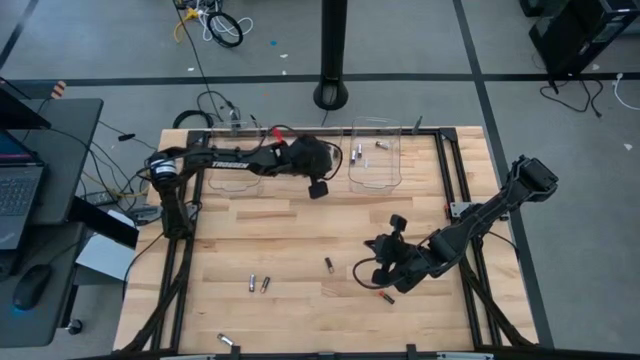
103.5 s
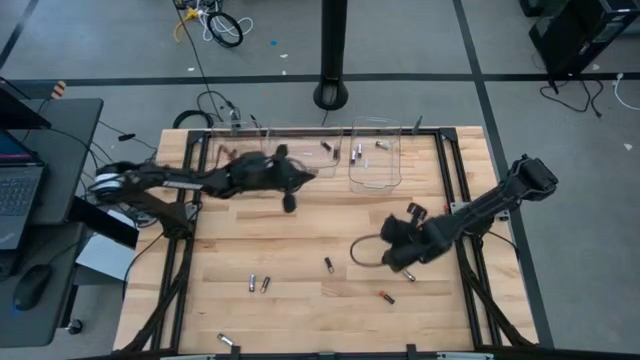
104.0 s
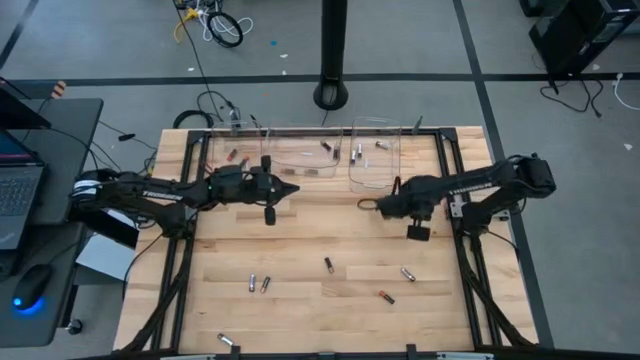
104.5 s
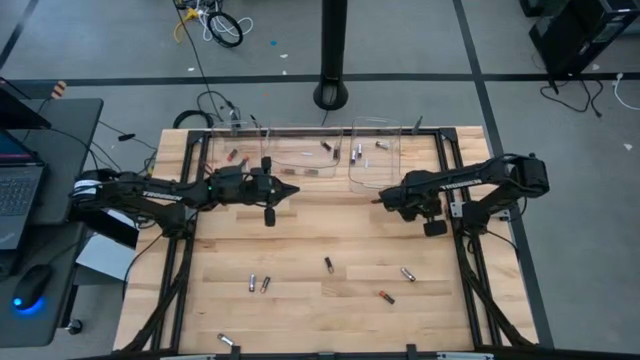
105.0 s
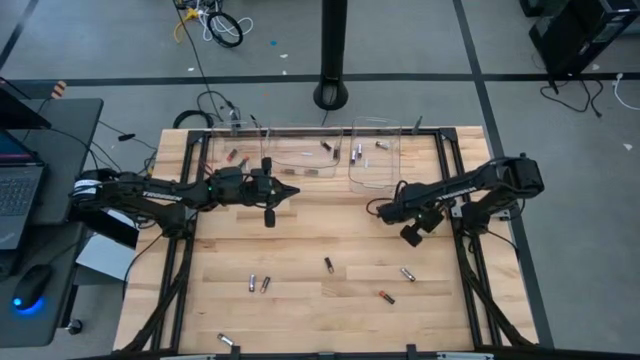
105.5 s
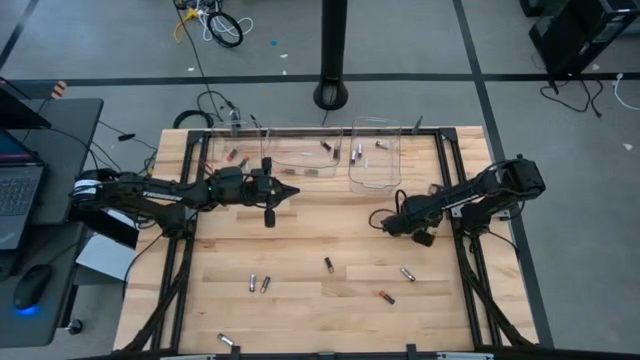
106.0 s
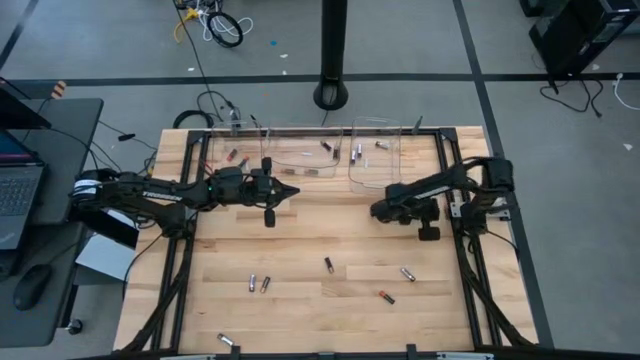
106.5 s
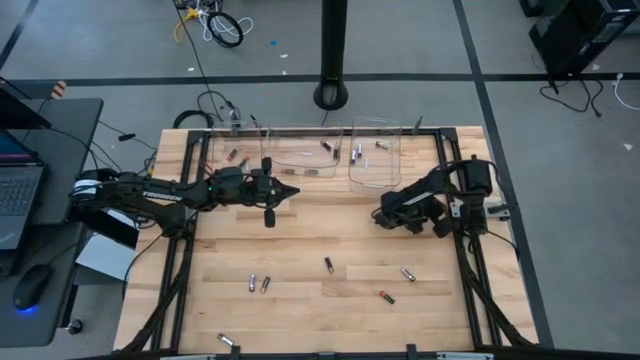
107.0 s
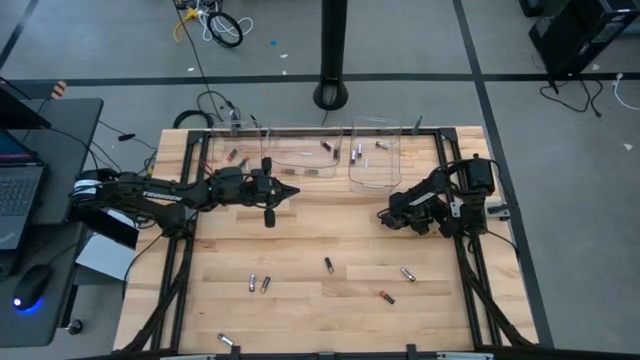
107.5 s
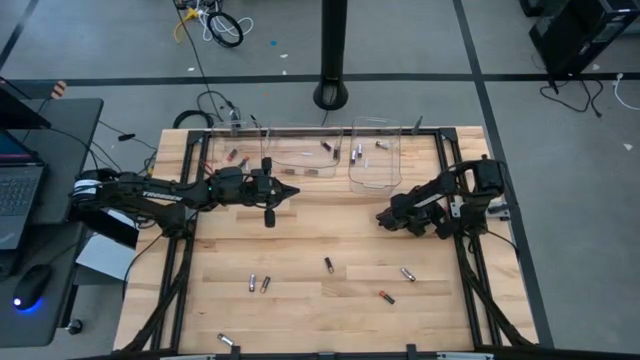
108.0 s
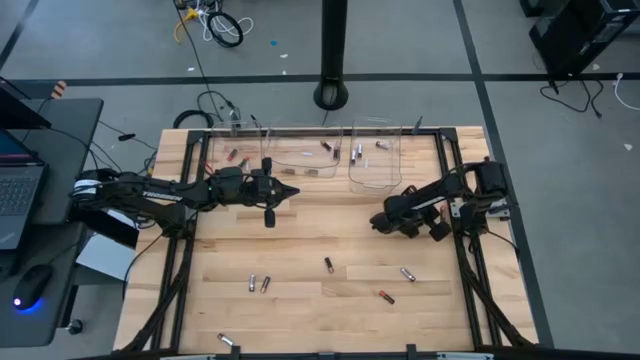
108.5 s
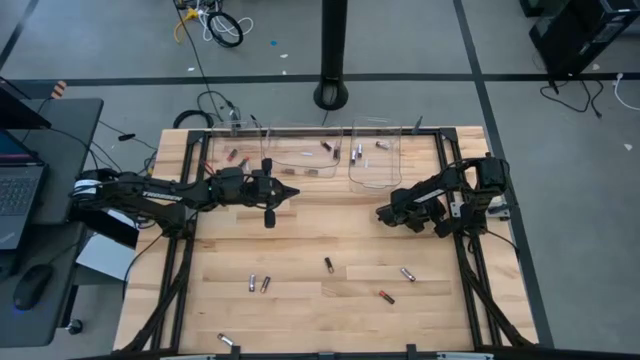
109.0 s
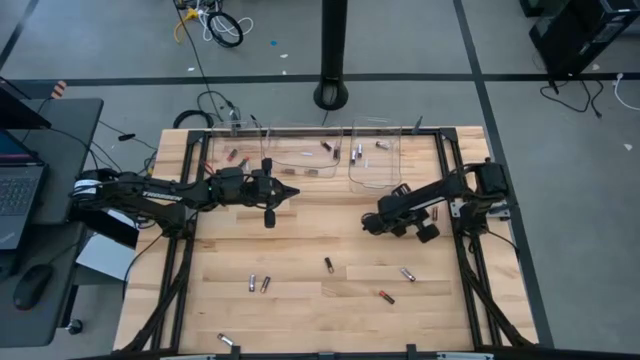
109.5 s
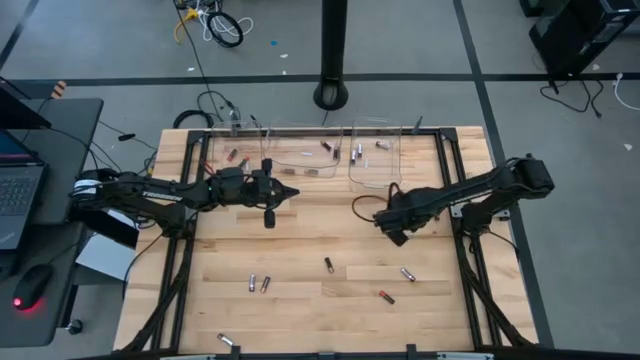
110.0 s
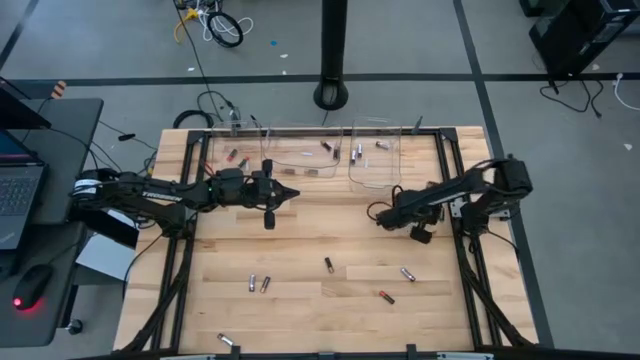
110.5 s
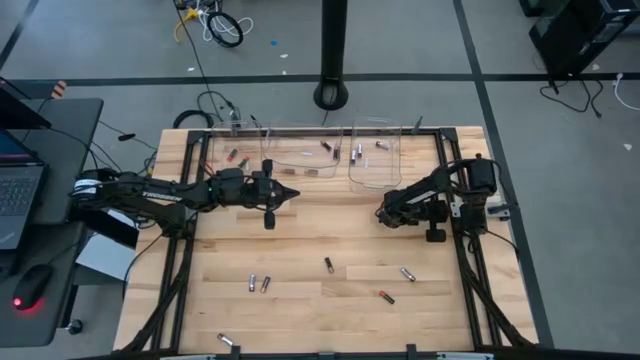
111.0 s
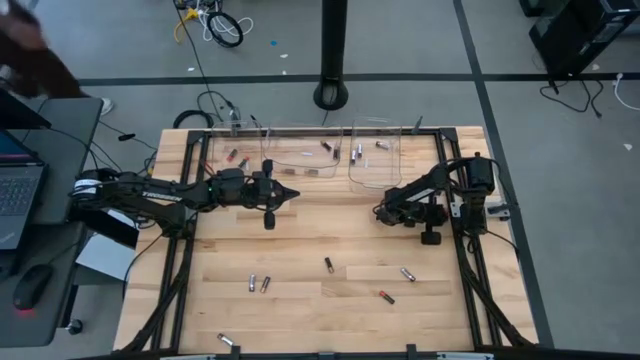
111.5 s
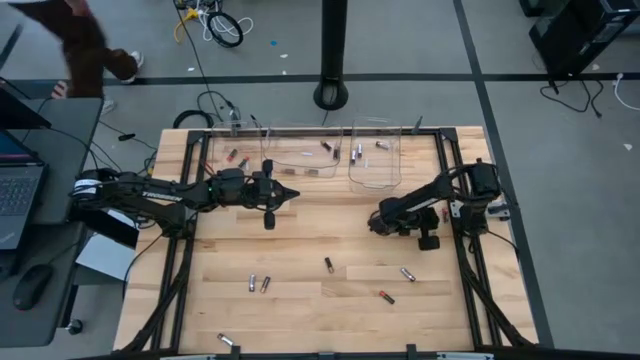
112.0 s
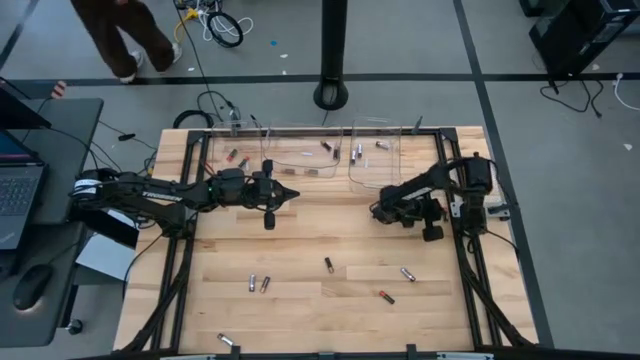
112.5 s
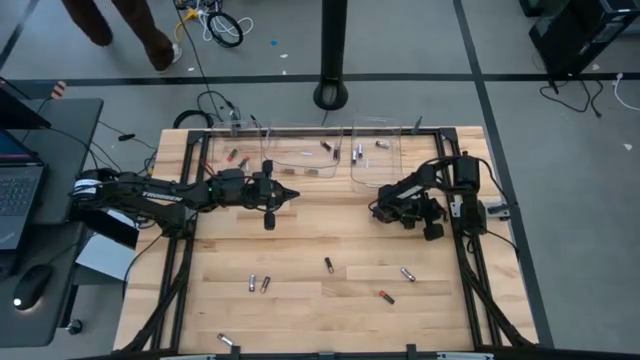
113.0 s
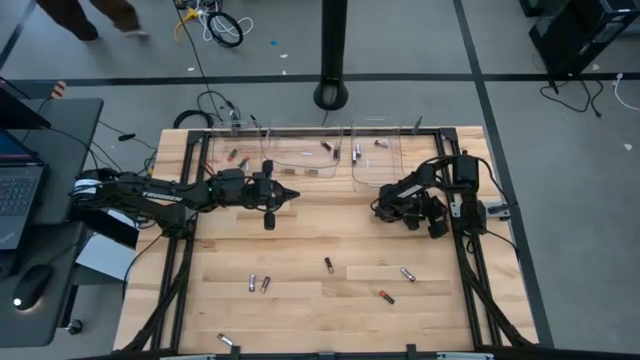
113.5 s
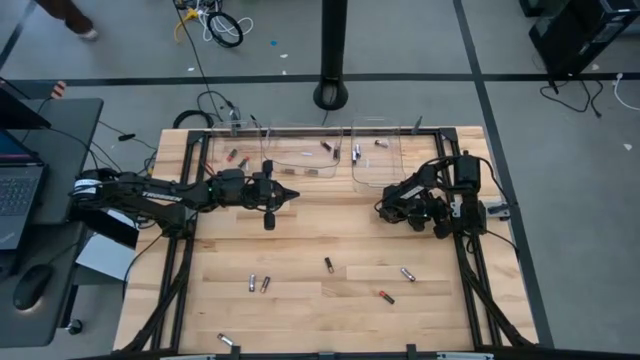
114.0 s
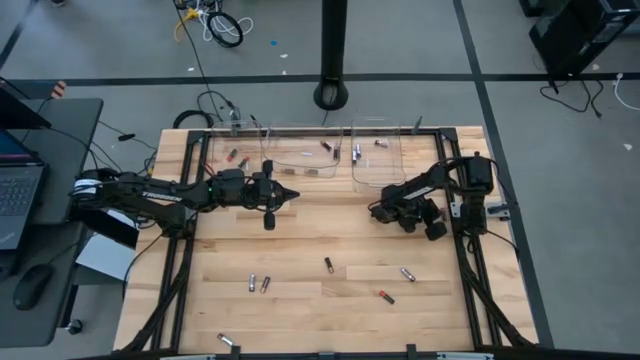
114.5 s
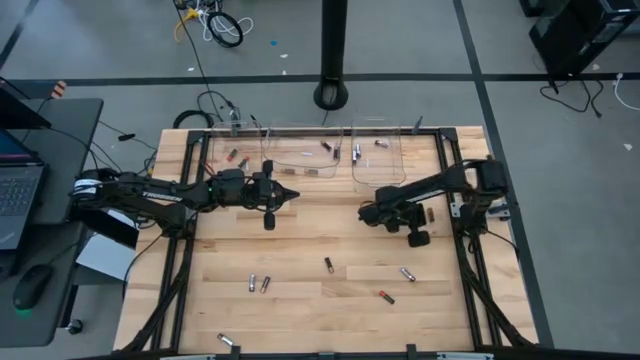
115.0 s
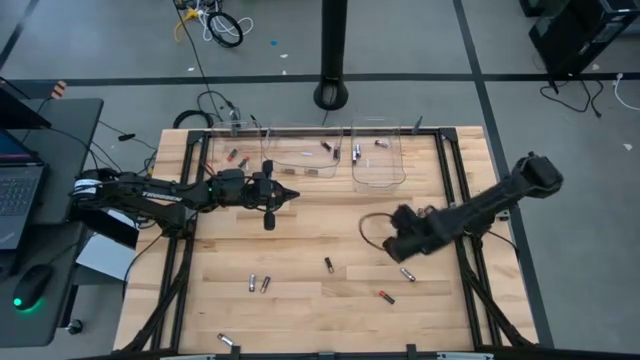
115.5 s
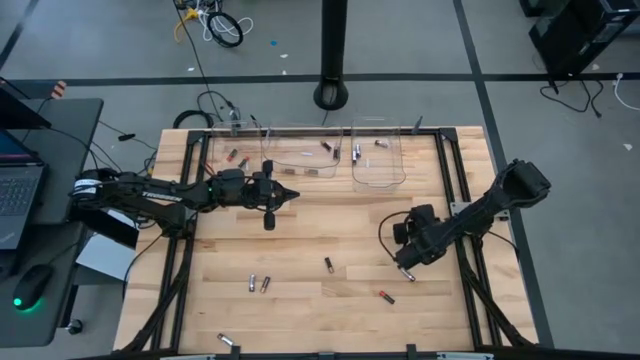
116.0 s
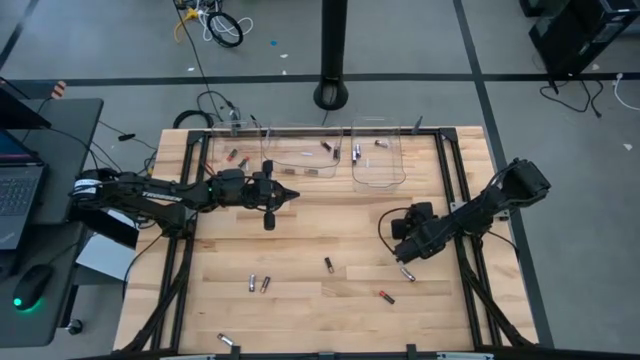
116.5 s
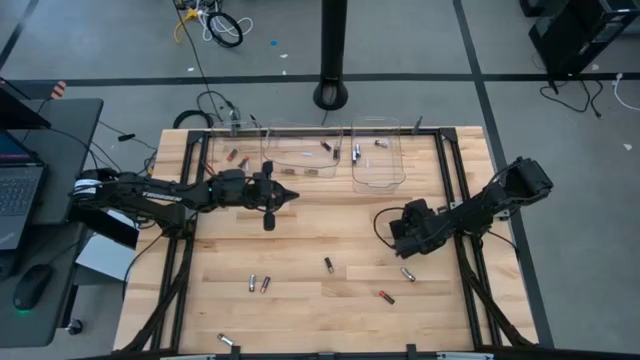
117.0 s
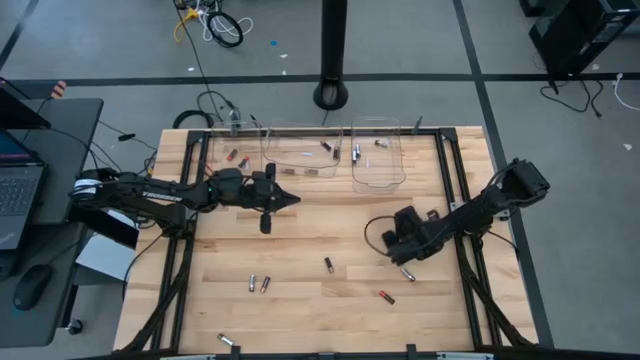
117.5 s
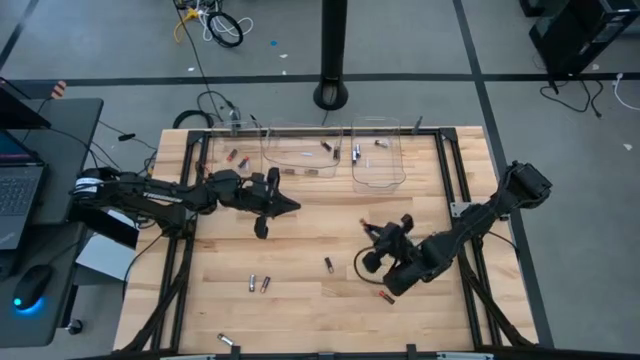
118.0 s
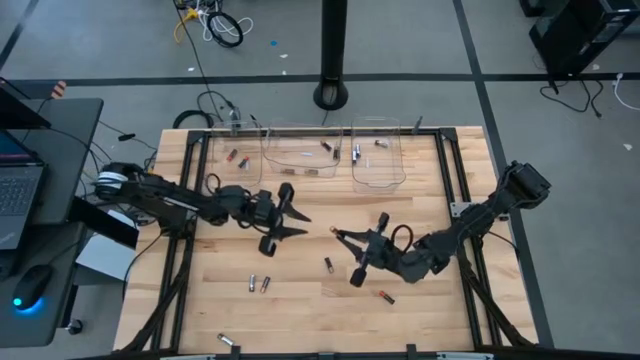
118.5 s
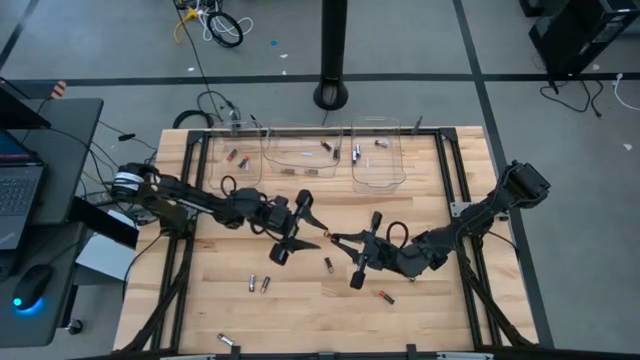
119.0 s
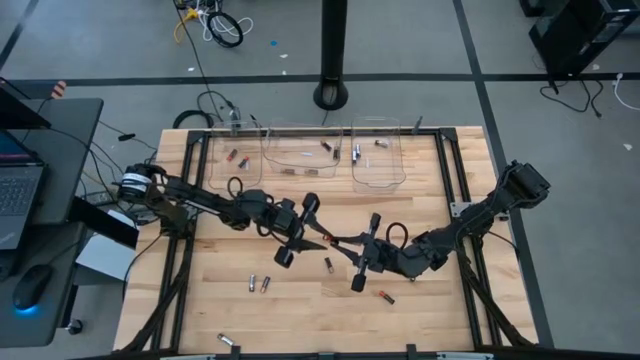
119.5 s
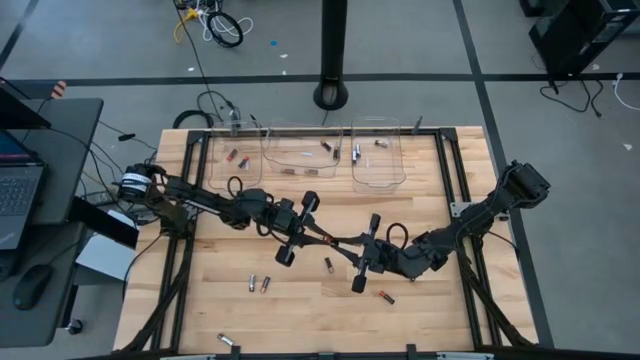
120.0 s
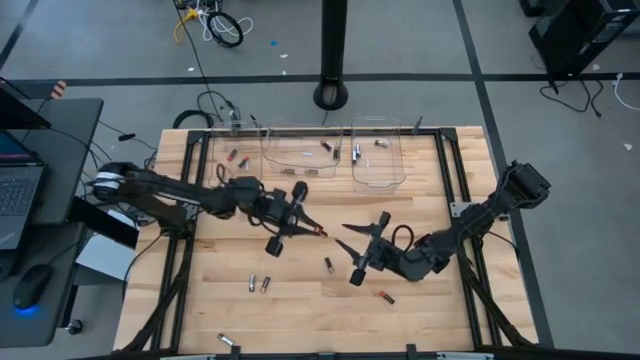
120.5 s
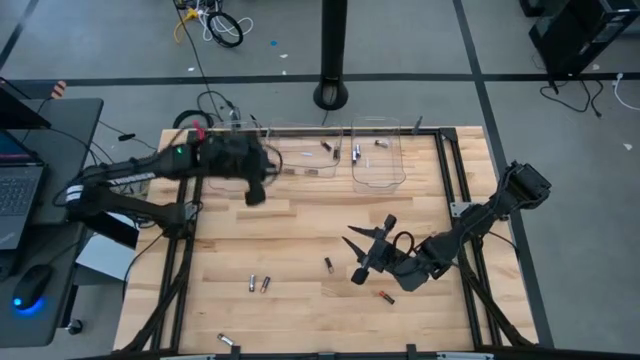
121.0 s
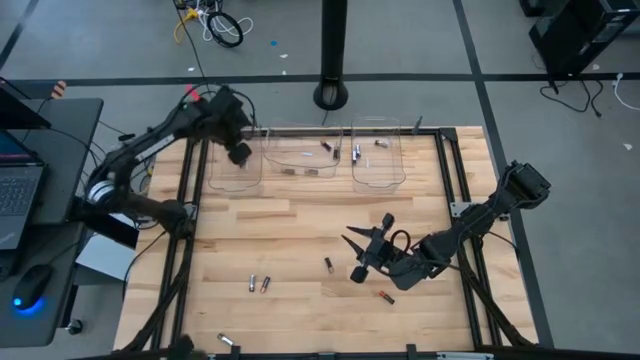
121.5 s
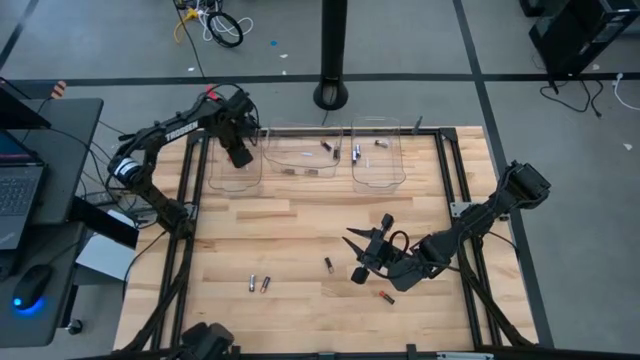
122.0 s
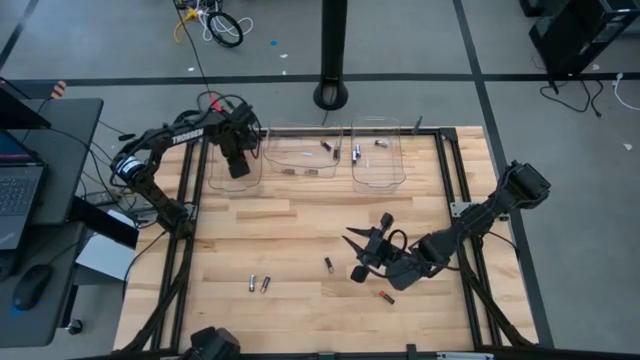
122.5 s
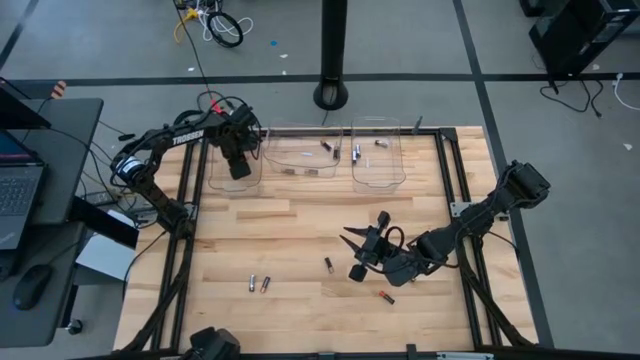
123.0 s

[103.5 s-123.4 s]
Task: Sort batteries
Put the orange battery into the left transparent bin

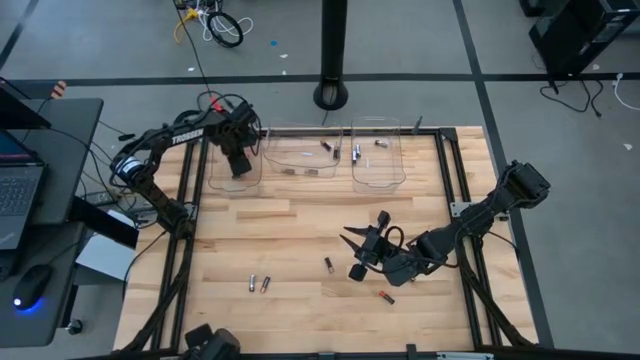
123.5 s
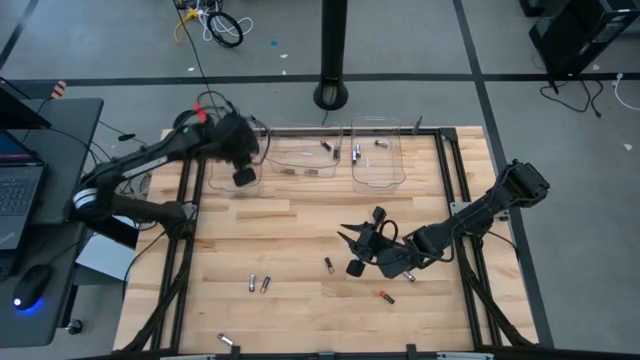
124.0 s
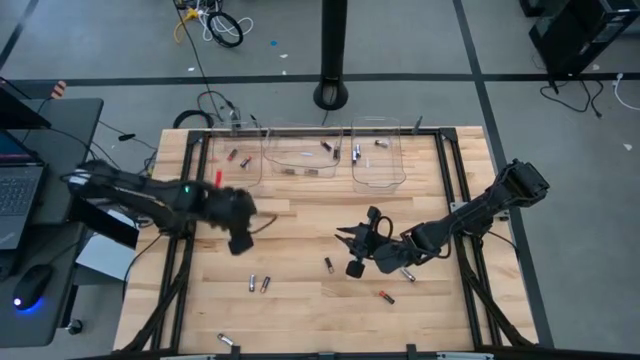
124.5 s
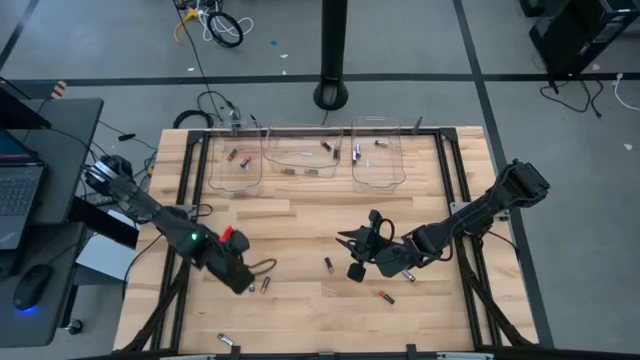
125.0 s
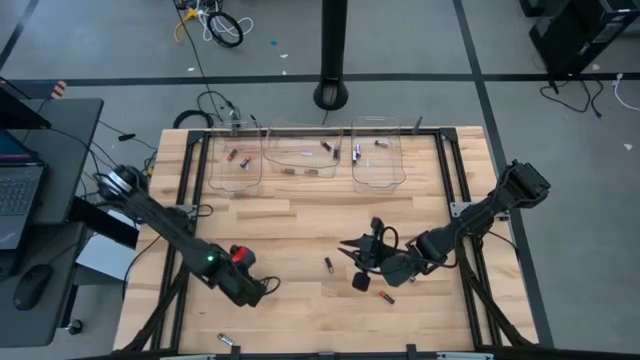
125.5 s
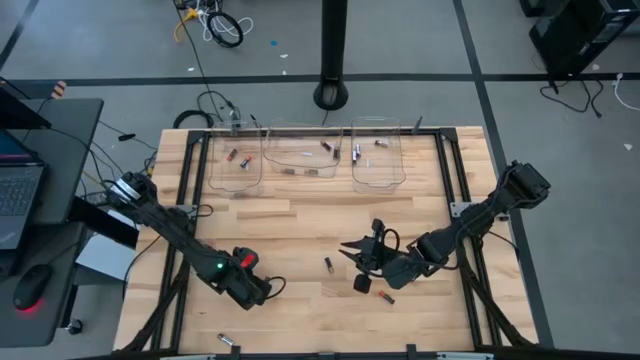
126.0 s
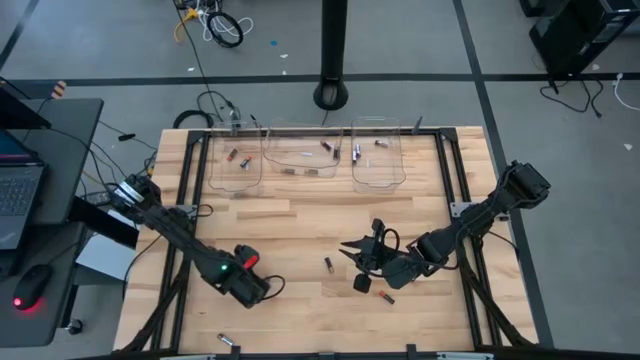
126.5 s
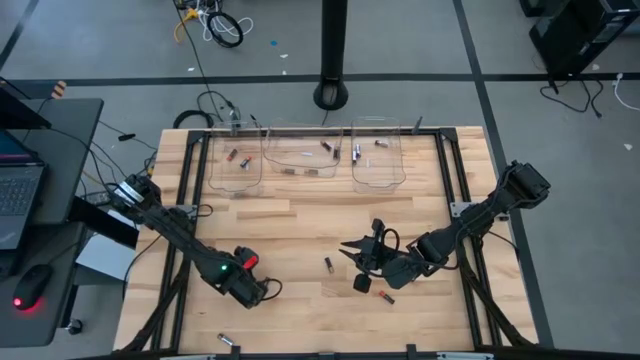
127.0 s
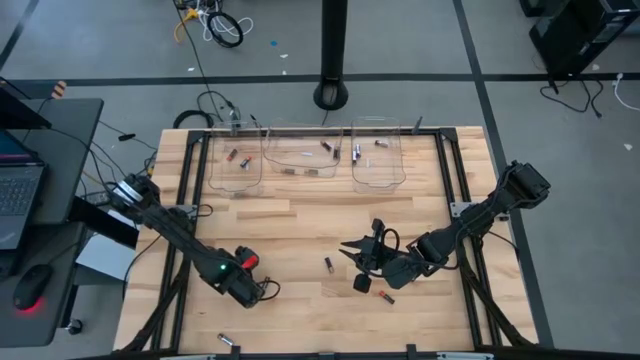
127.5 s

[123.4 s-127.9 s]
Put the silver battery into the right transparent bin
